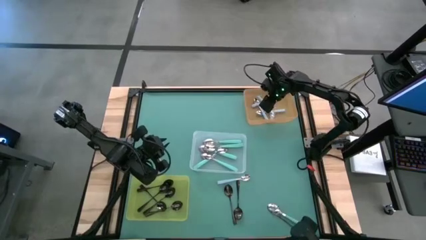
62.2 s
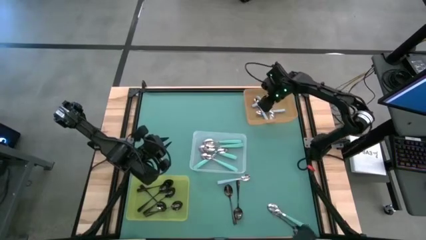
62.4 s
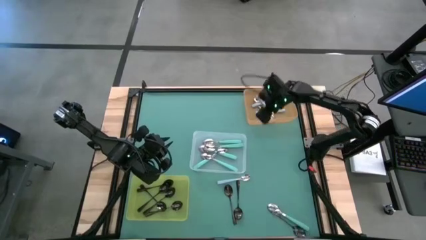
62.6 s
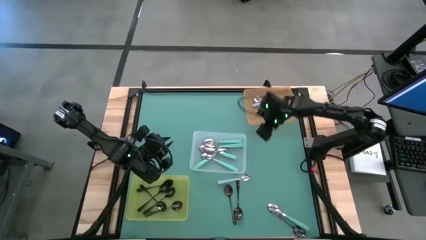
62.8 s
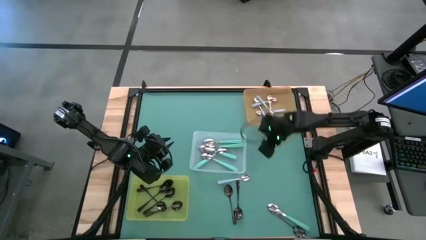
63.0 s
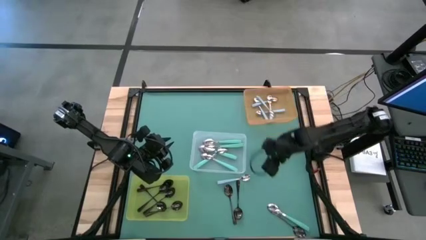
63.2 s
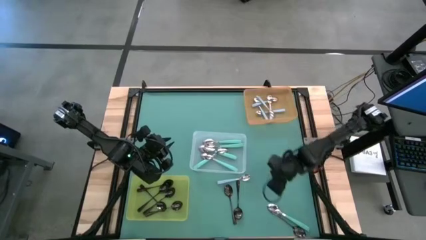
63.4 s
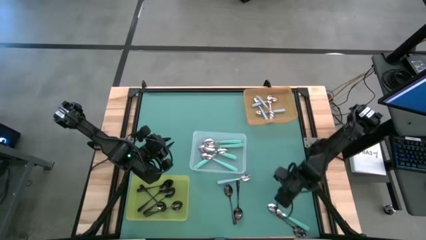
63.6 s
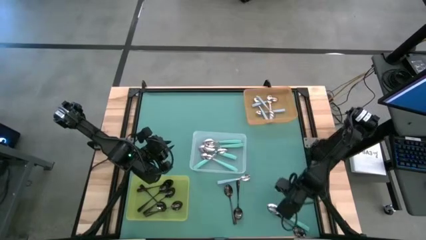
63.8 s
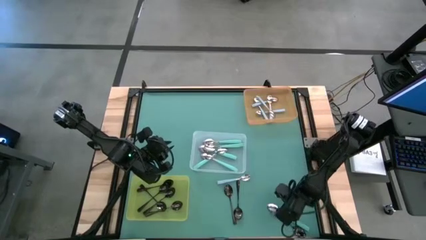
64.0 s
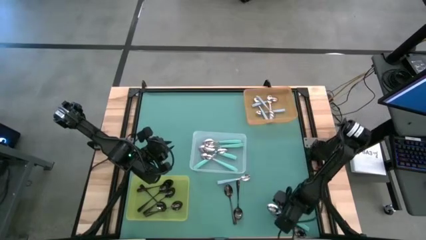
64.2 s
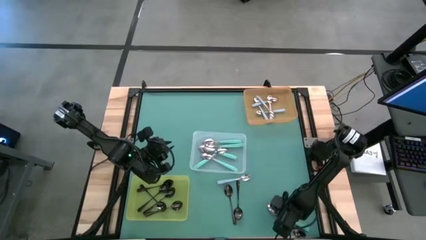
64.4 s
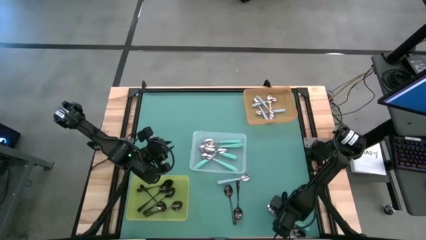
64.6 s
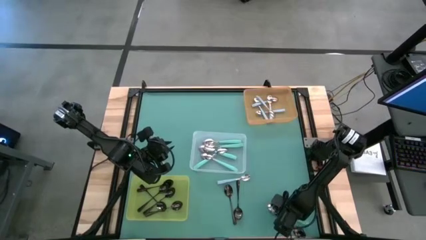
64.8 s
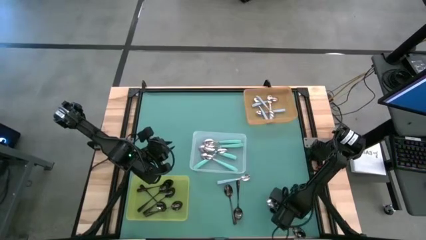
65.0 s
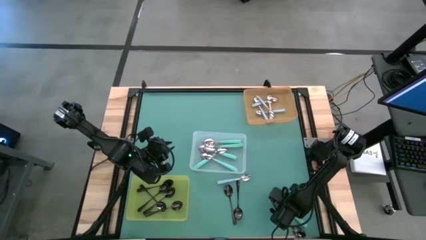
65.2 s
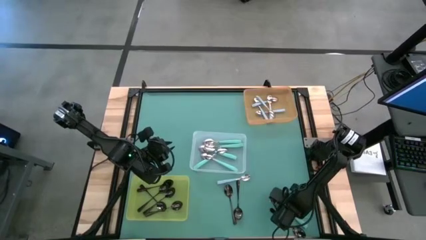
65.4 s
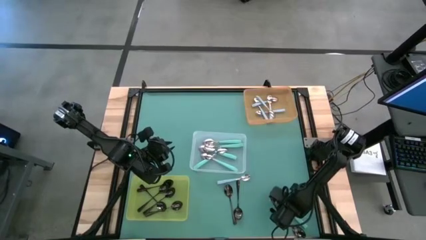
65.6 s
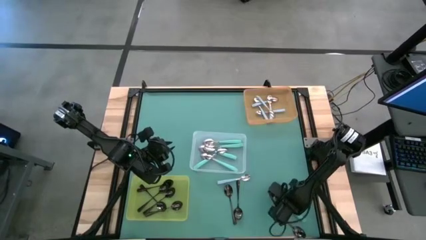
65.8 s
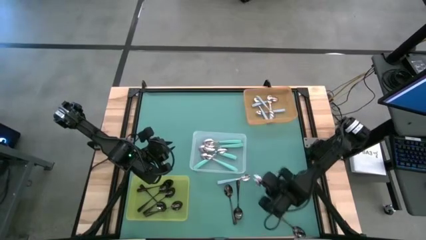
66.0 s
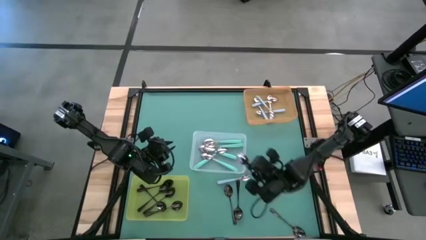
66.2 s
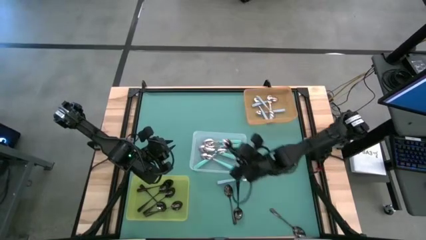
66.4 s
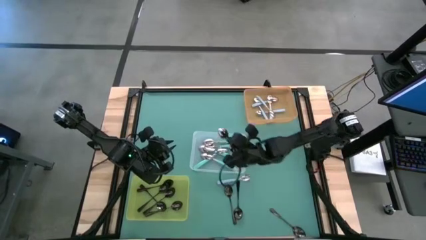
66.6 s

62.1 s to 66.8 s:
Task: Sort silverware by color (type)
Put the green spoon into the transparent bin

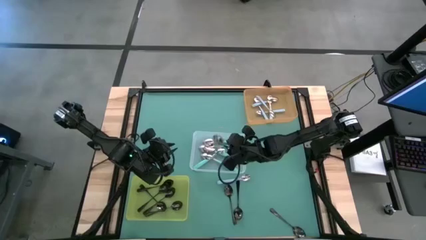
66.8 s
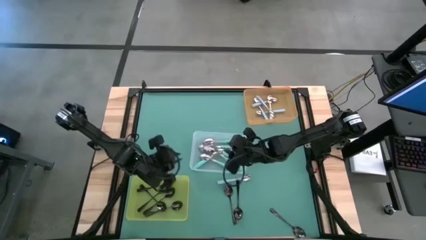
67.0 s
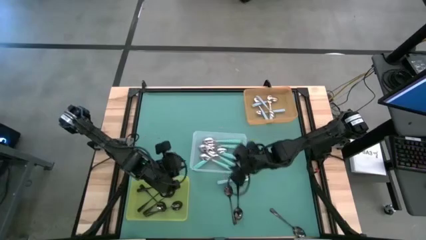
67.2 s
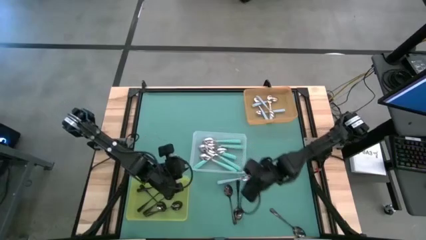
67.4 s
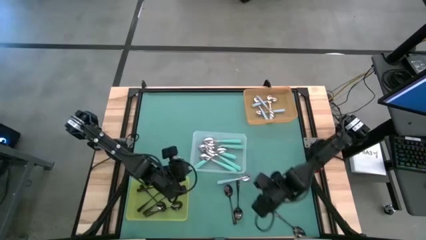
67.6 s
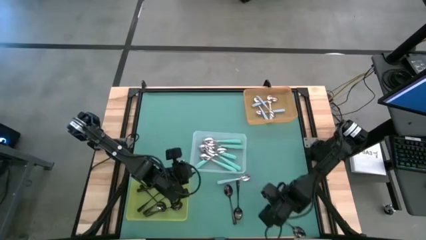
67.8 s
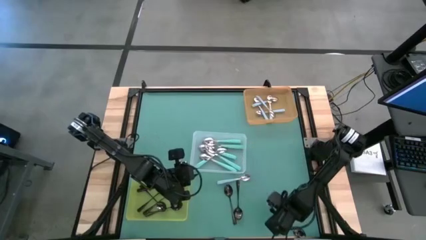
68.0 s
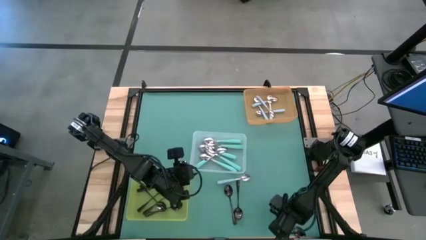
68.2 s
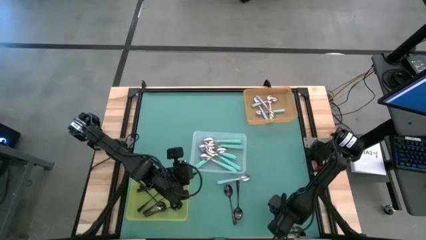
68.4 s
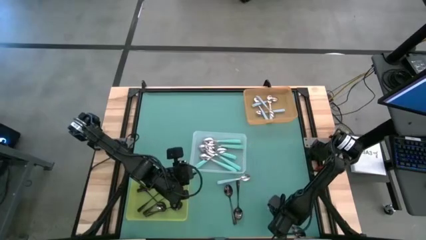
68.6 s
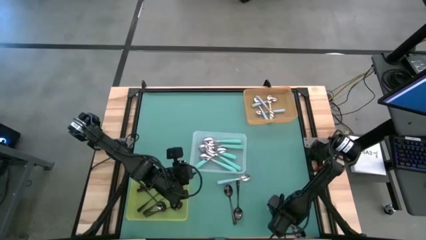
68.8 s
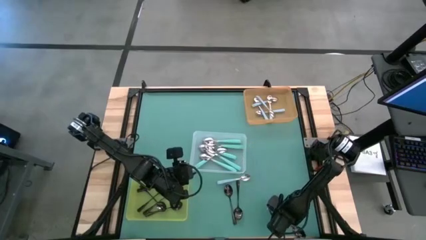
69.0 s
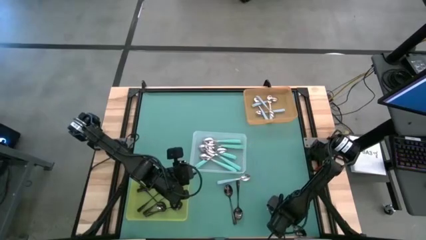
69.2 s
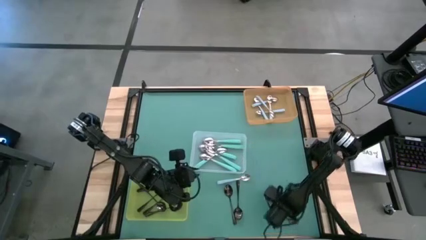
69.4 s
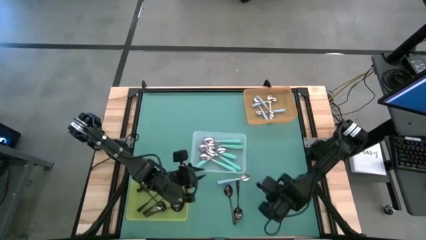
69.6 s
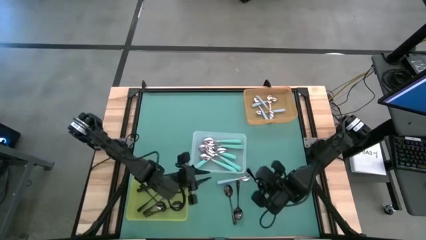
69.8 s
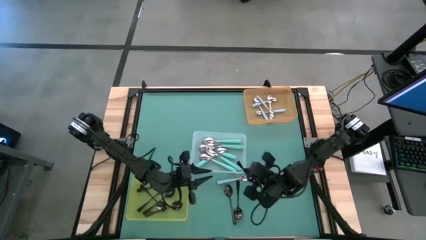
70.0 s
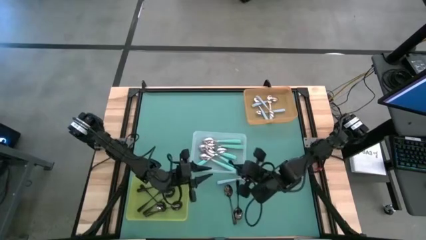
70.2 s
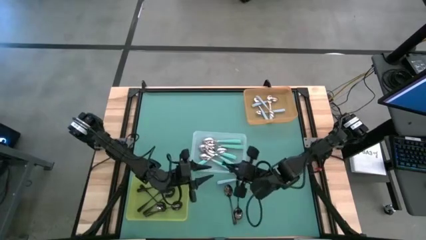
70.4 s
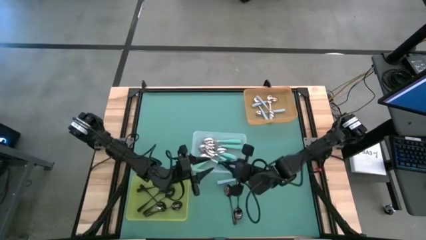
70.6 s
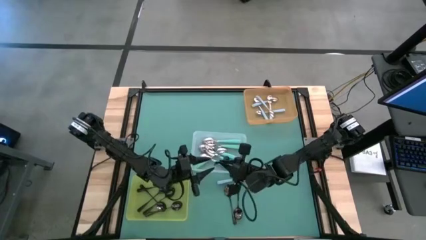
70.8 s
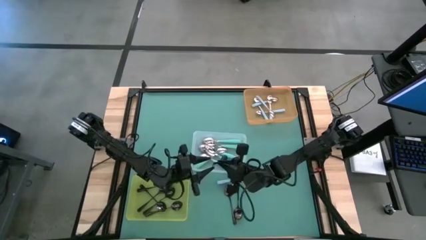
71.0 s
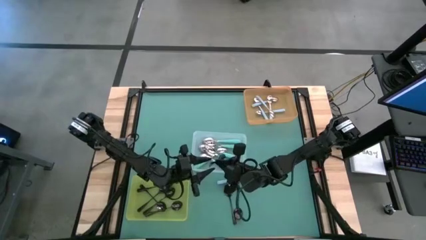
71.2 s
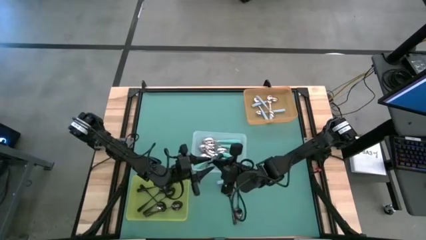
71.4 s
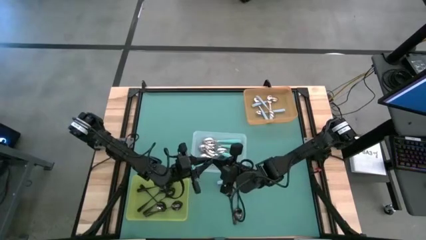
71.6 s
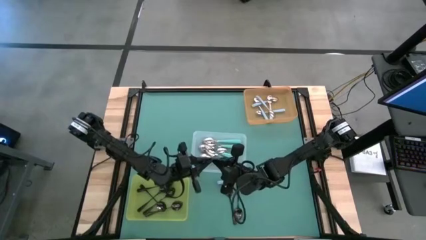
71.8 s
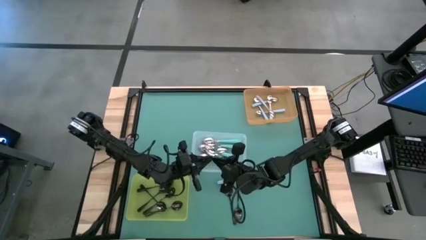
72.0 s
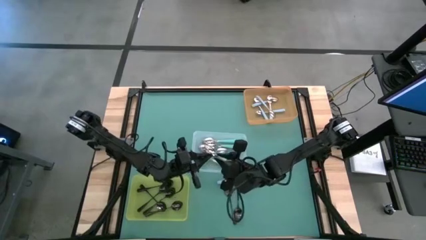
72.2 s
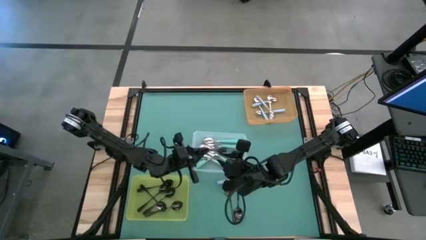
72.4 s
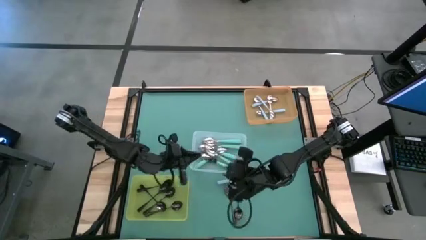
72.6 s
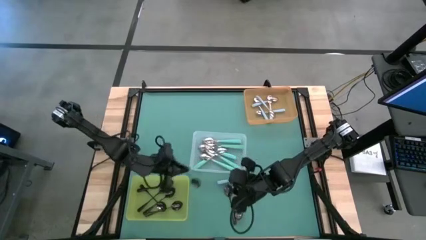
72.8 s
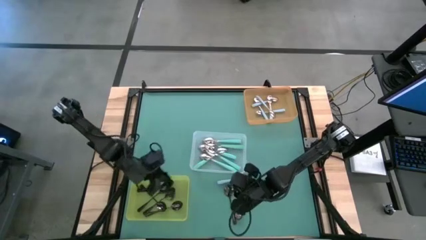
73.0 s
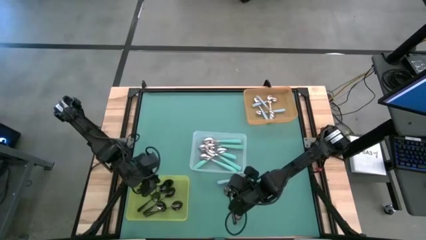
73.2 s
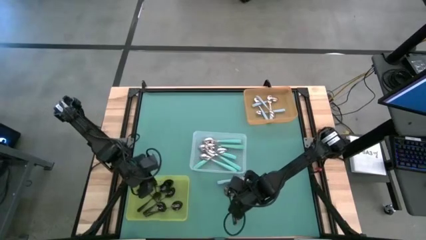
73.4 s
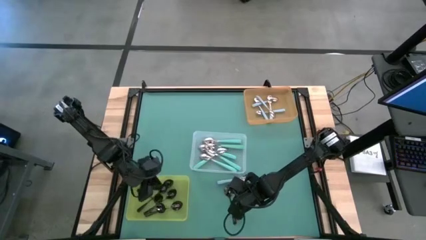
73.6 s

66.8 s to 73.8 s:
Put the black spoon into the yellow bin

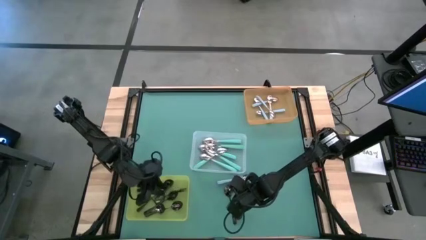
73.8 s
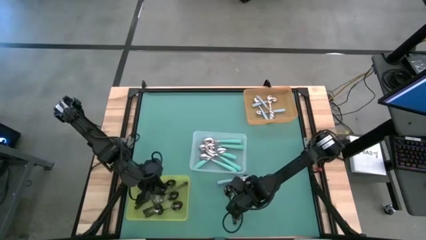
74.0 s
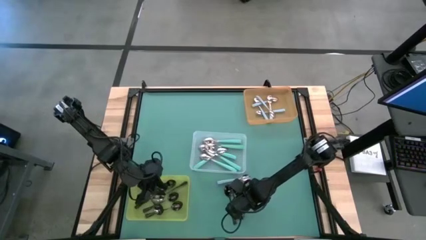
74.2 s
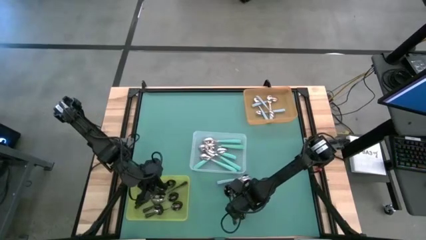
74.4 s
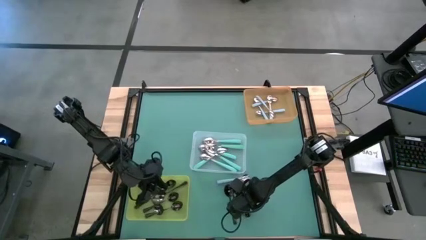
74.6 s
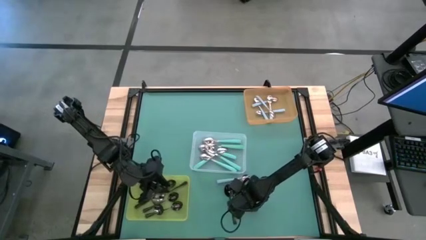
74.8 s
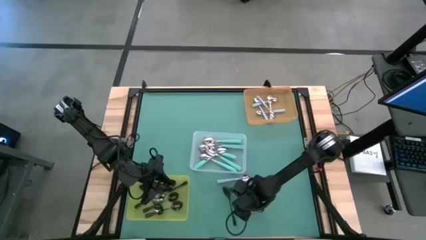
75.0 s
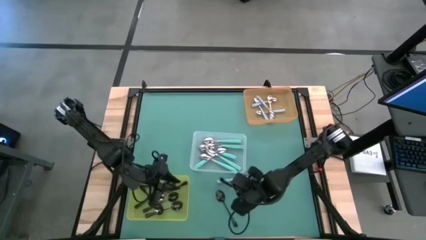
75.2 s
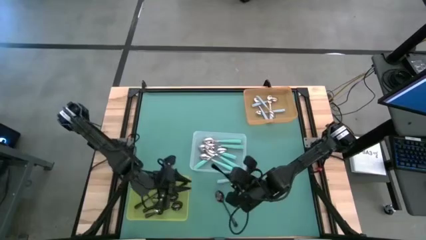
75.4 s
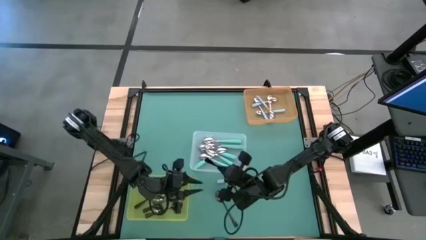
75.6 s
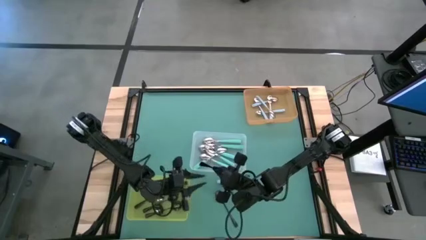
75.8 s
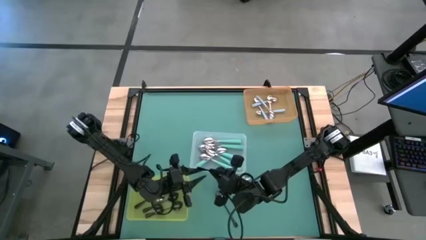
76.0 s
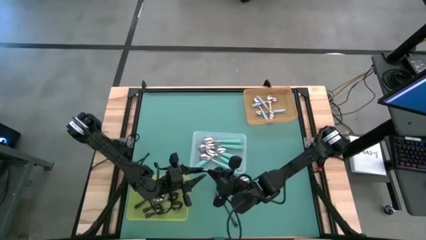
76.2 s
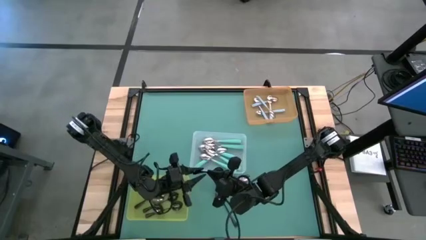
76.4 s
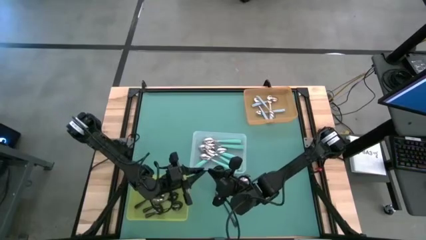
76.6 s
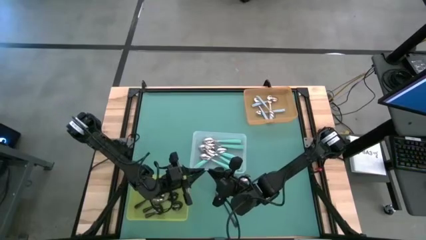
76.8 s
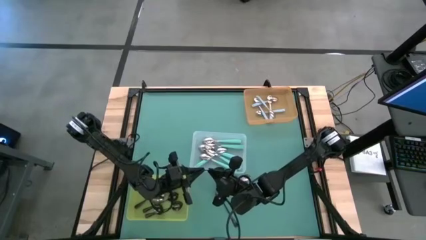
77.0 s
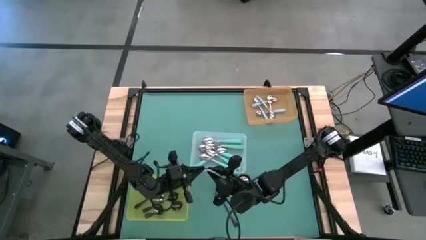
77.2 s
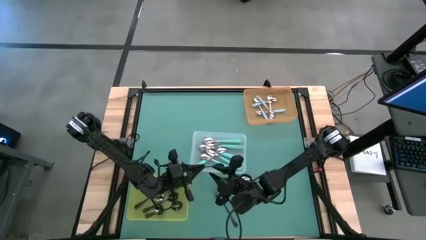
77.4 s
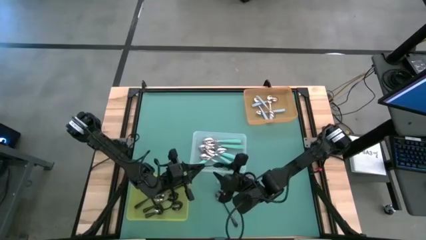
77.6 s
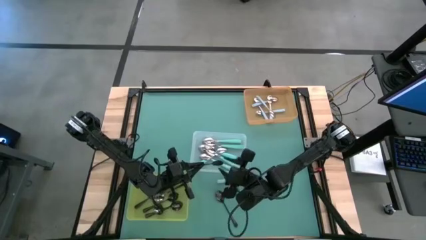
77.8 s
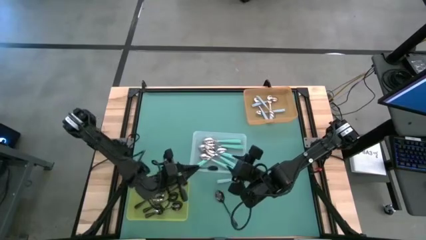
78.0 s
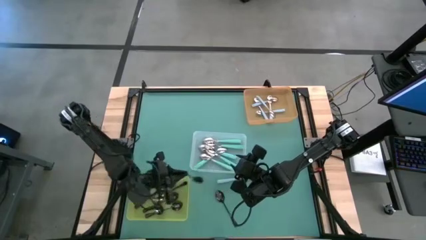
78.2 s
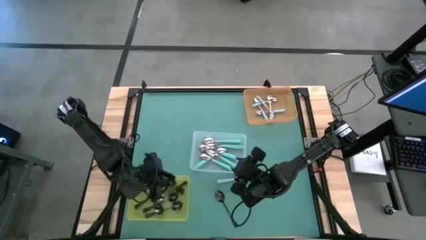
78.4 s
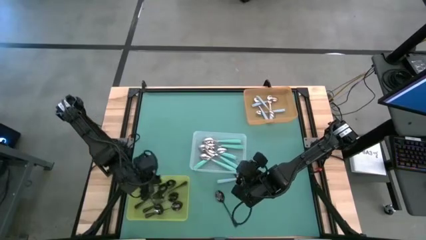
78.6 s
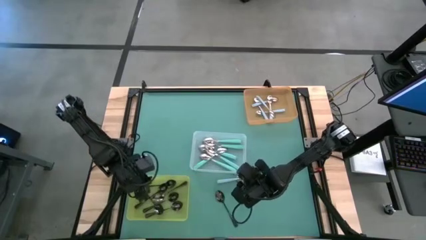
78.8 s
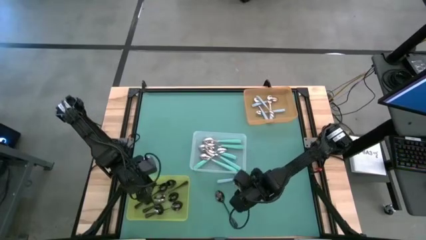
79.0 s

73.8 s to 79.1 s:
Put the black spoon into the yellow bin
